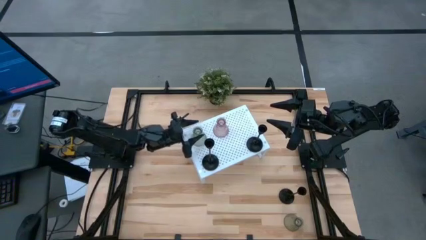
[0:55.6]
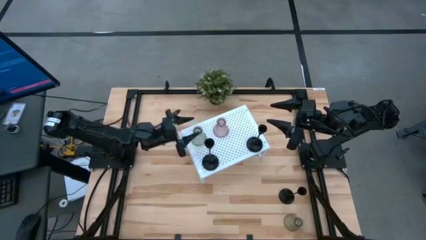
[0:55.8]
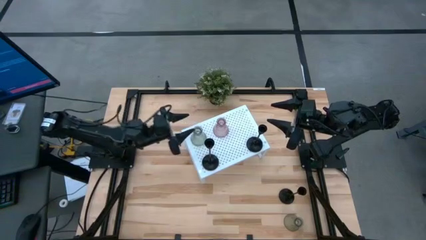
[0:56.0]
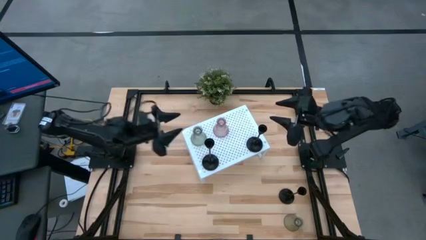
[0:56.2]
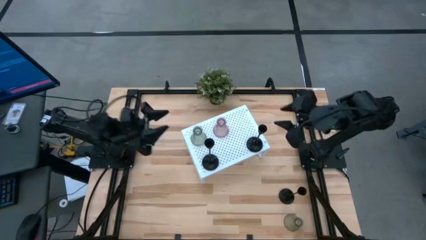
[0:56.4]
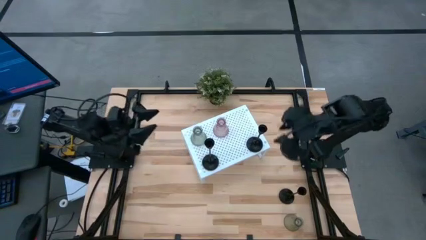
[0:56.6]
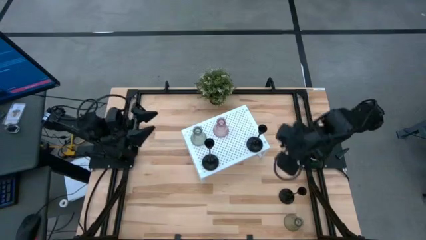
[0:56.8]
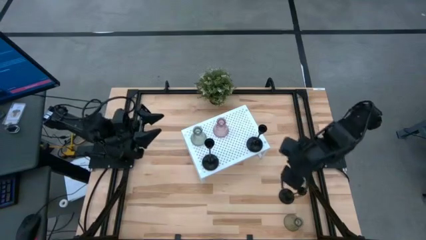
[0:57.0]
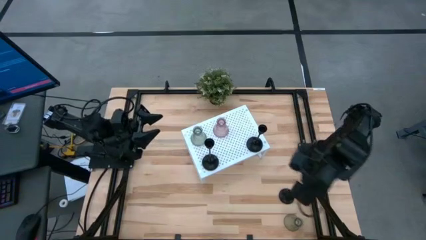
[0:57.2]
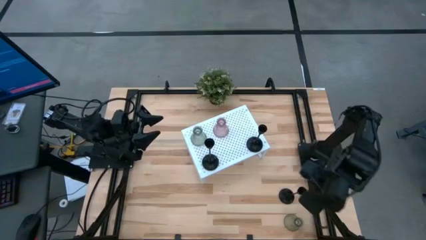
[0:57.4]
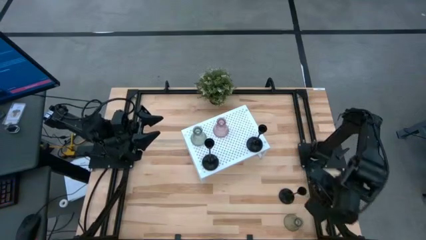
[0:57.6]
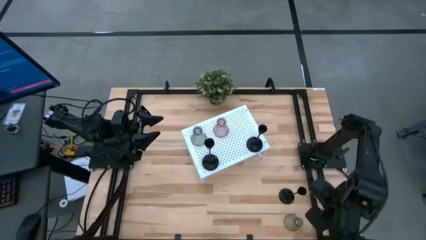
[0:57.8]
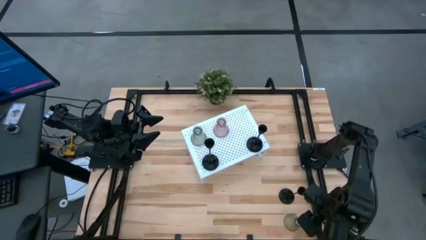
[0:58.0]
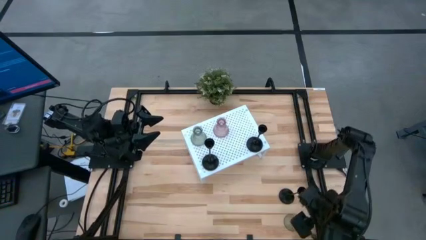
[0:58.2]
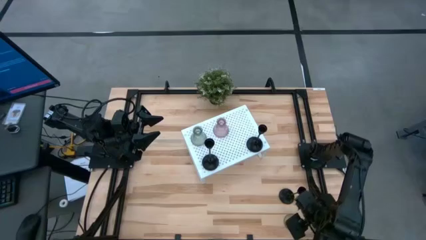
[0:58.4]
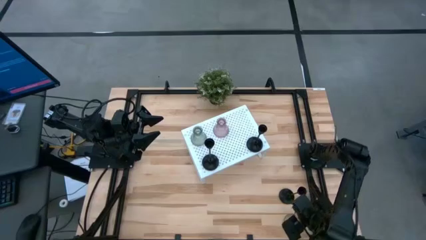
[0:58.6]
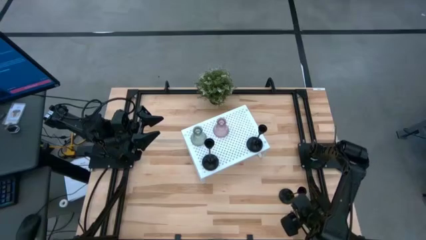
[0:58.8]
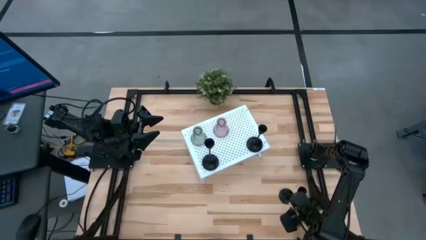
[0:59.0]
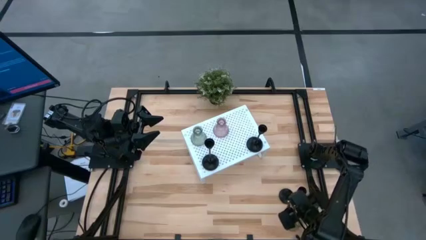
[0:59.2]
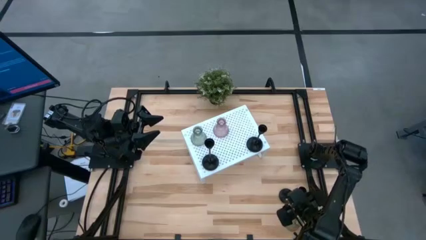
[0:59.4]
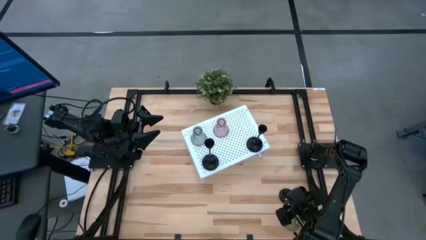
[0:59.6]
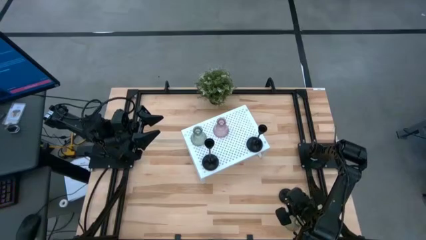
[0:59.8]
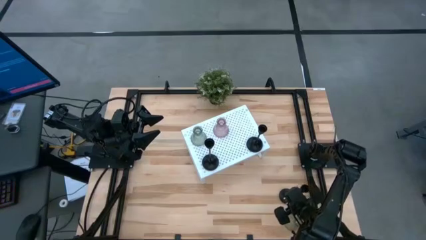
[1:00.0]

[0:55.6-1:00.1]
Task: Pick & Place candle stick holders
Put the black candle holder onto the shelf

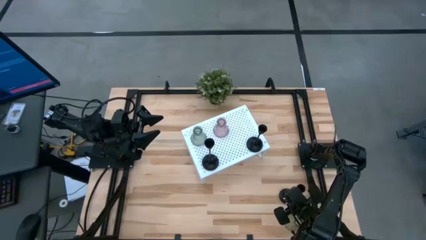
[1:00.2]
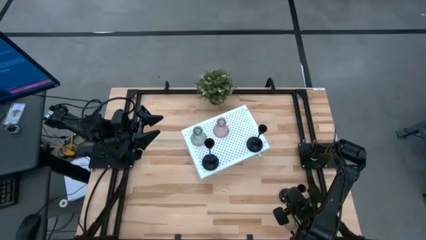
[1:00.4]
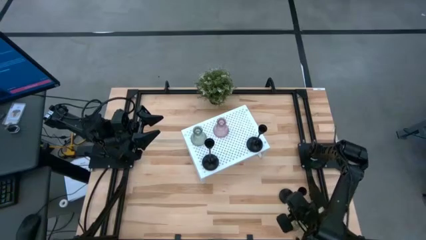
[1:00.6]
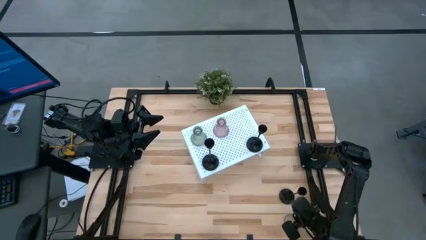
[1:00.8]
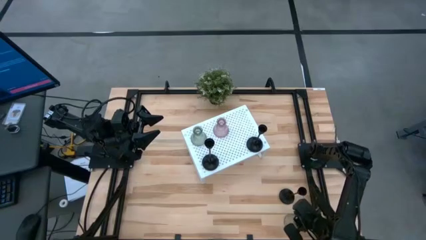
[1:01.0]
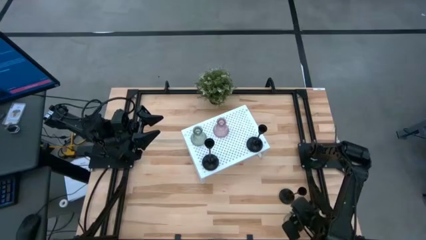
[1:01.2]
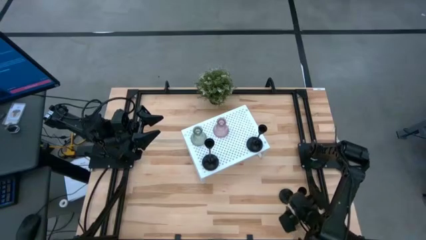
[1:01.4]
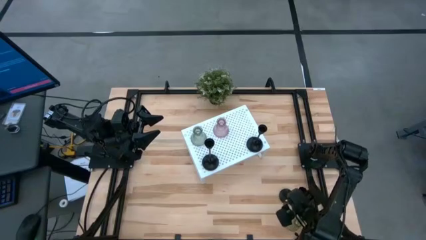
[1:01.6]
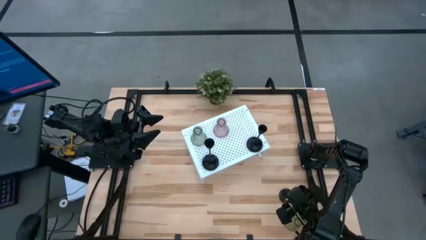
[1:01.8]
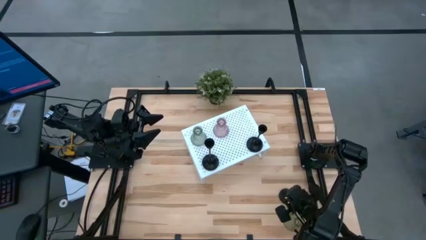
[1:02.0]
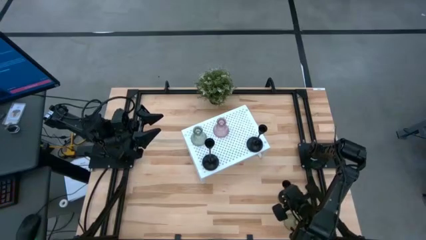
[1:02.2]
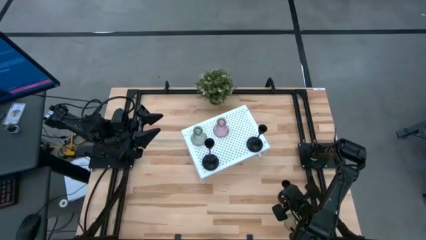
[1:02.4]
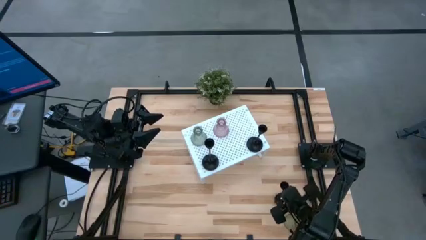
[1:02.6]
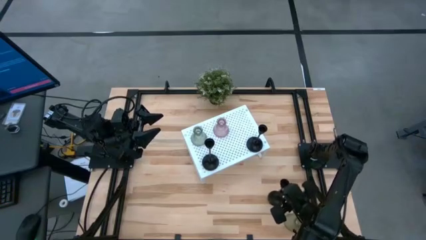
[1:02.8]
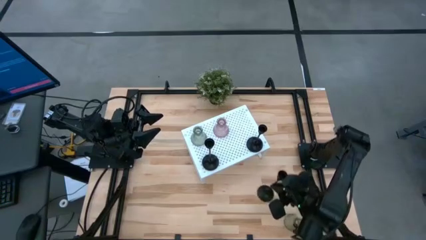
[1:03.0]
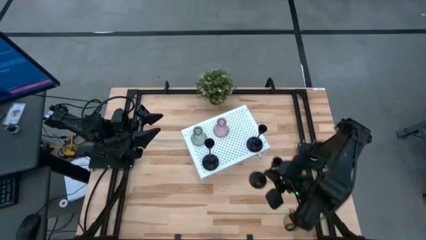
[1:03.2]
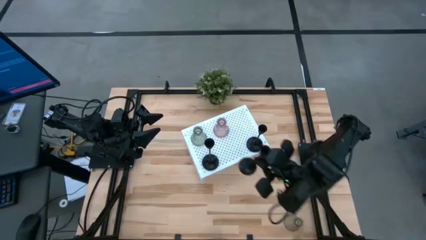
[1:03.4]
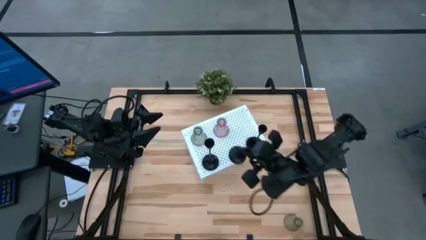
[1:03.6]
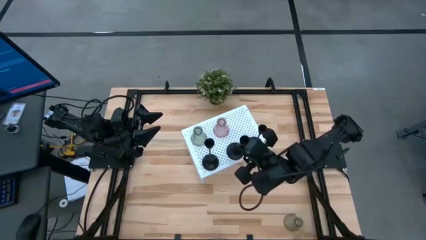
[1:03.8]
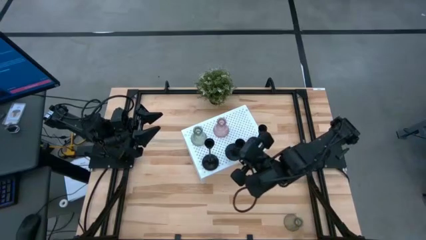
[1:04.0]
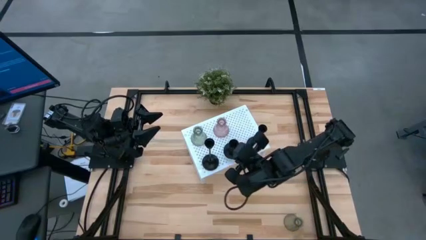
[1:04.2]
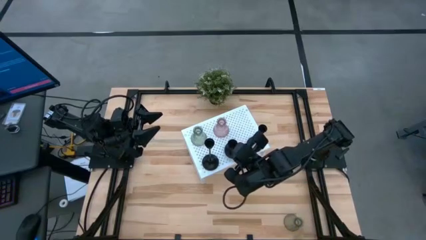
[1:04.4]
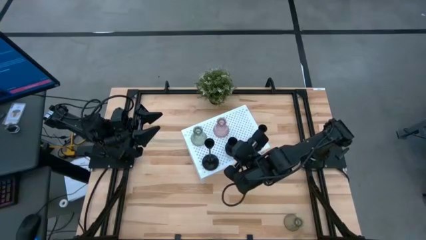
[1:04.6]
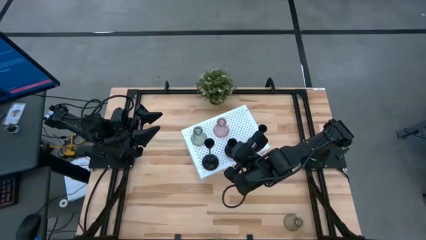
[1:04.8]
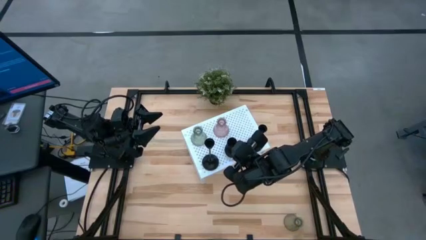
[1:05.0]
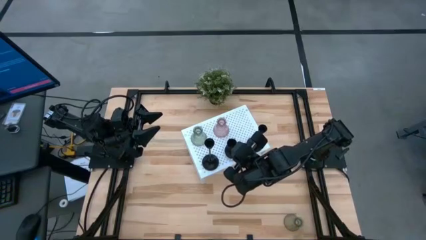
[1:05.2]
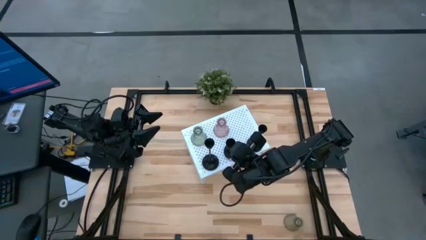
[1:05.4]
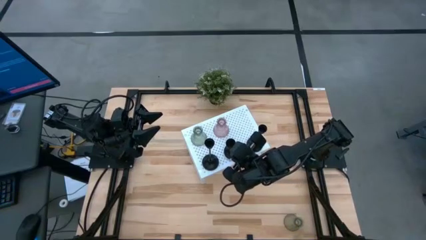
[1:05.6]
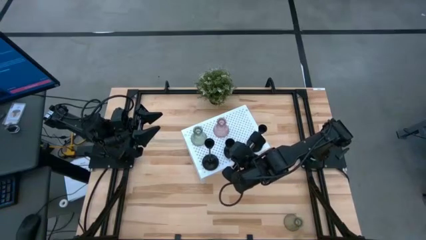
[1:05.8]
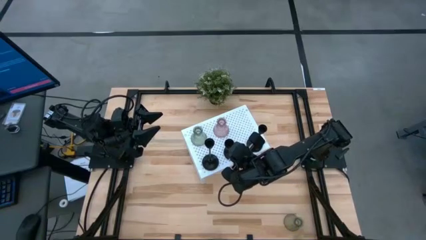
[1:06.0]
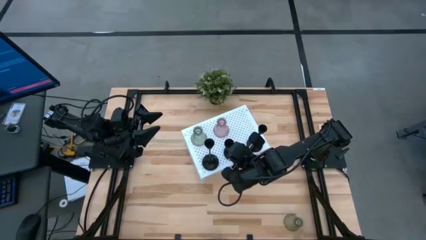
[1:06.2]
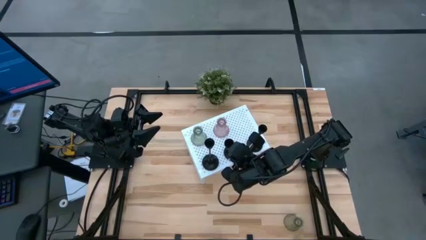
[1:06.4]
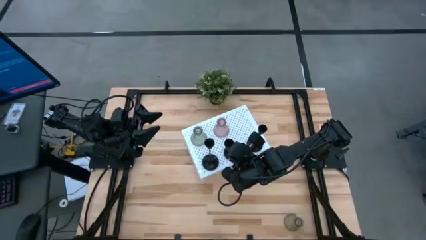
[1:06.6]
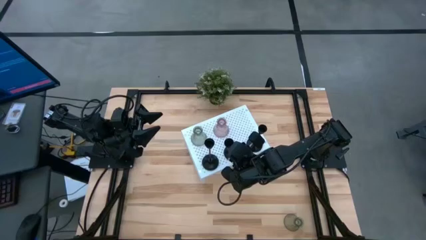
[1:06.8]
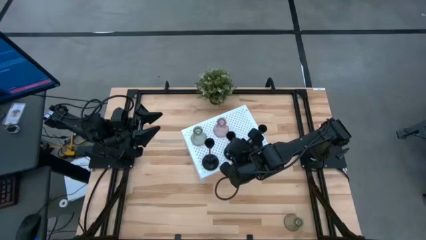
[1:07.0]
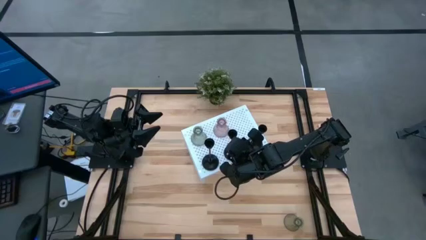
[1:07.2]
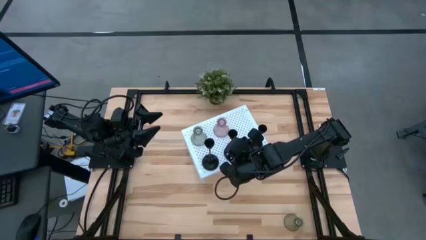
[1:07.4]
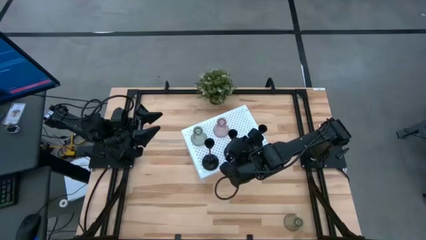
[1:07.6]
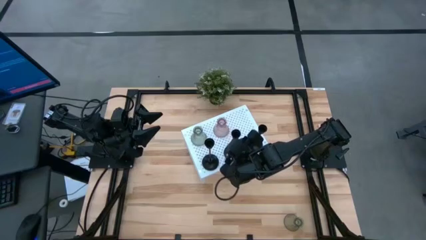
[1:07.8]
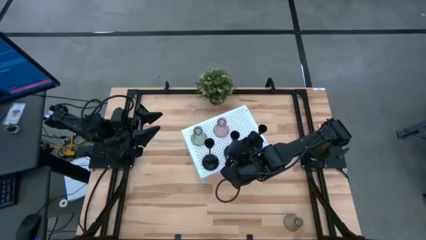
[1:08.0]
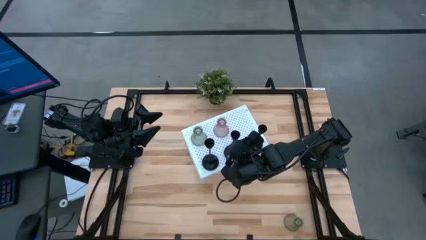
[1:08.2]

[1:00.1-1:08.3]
Put the black candle holder onto the shelf
